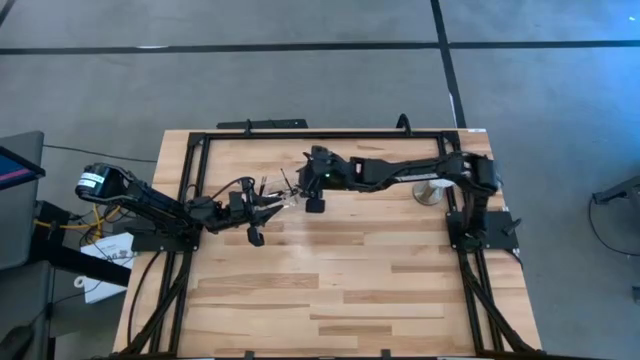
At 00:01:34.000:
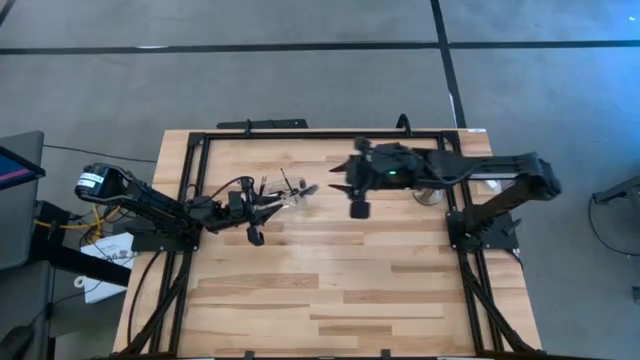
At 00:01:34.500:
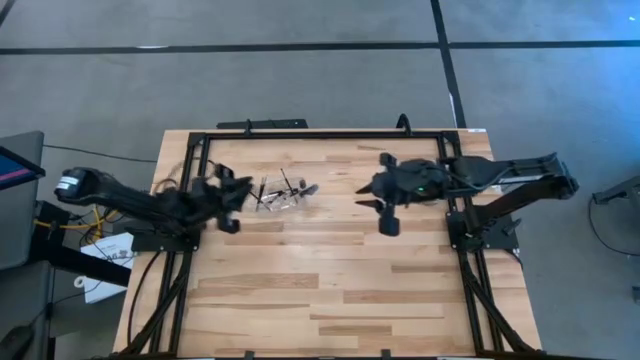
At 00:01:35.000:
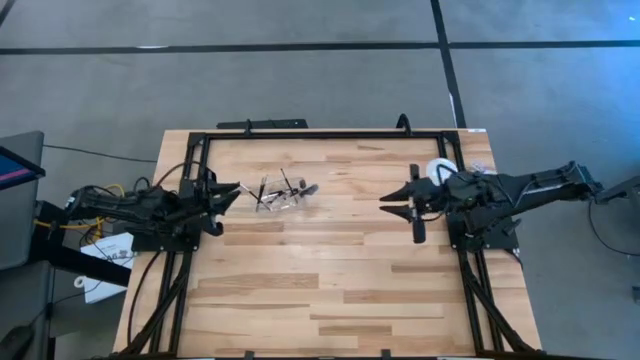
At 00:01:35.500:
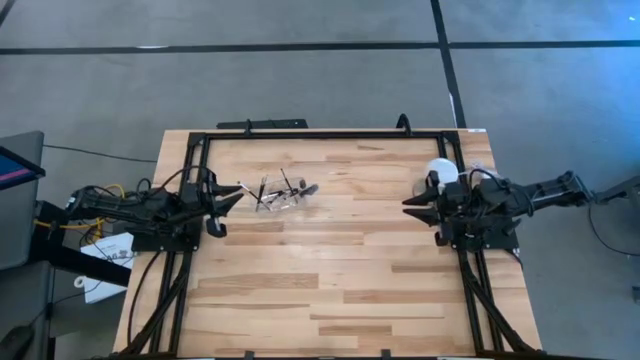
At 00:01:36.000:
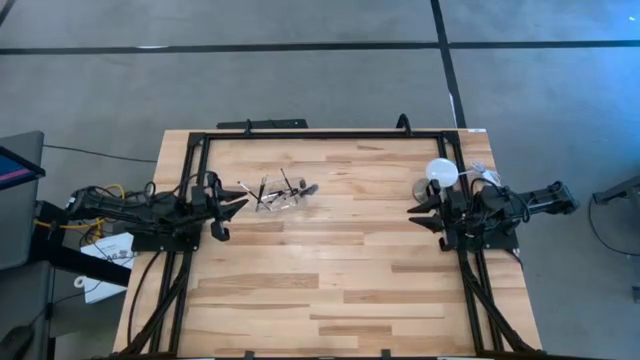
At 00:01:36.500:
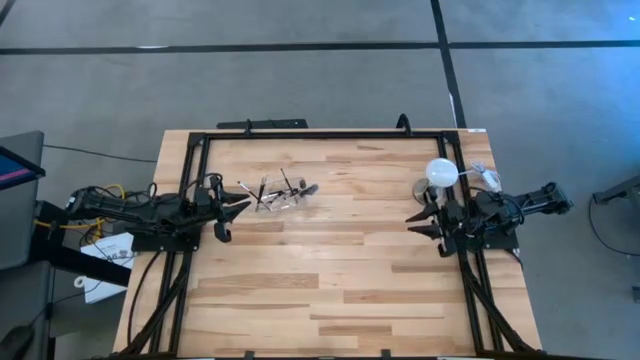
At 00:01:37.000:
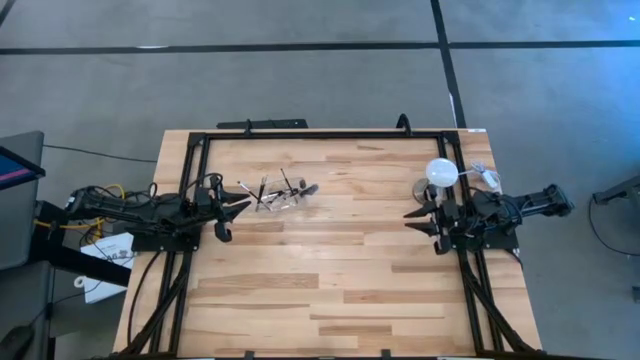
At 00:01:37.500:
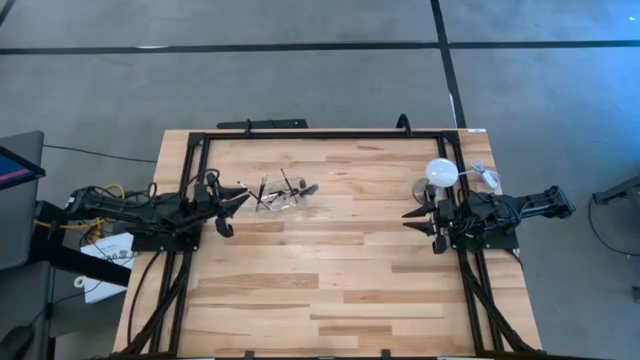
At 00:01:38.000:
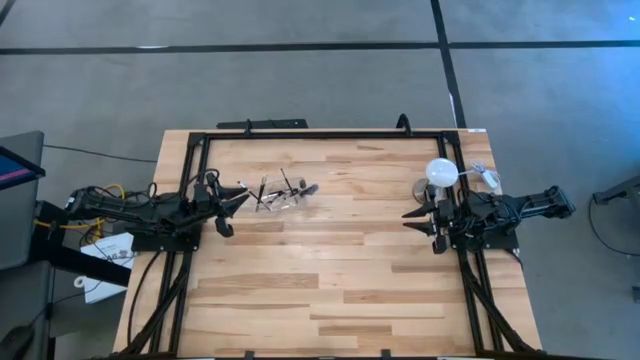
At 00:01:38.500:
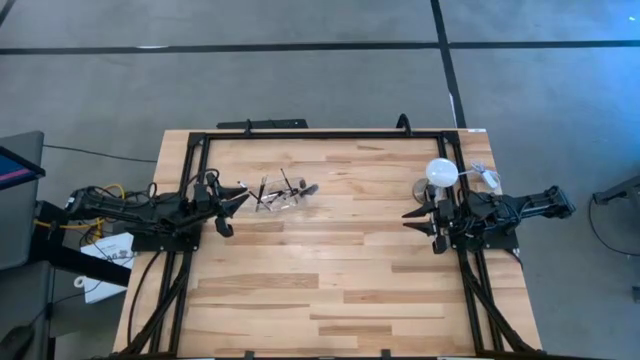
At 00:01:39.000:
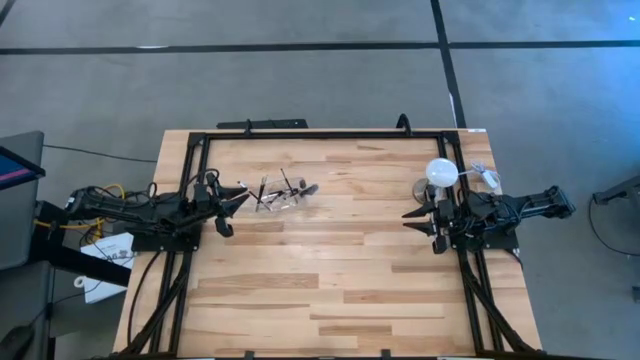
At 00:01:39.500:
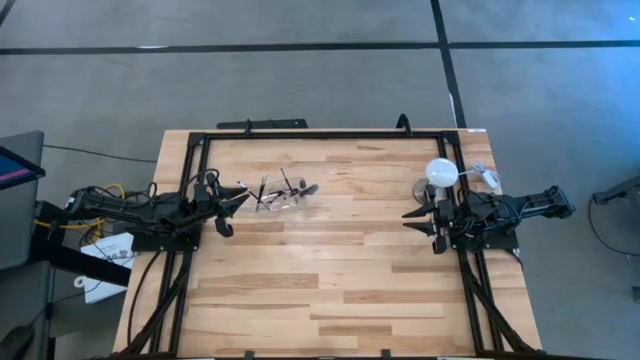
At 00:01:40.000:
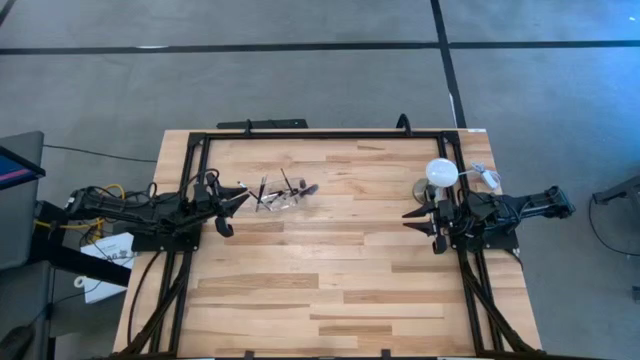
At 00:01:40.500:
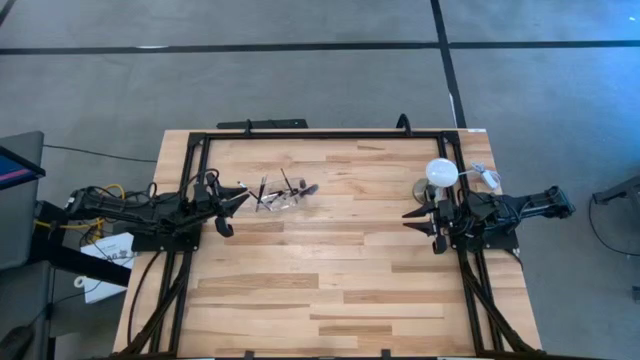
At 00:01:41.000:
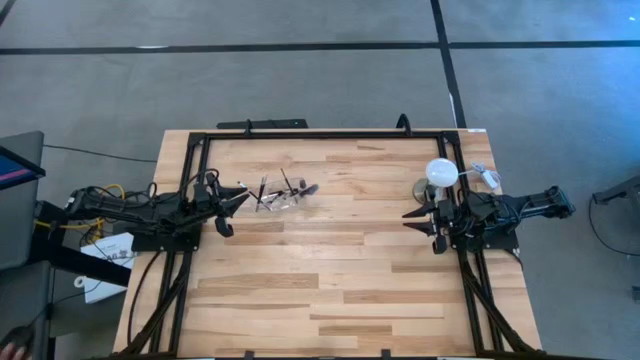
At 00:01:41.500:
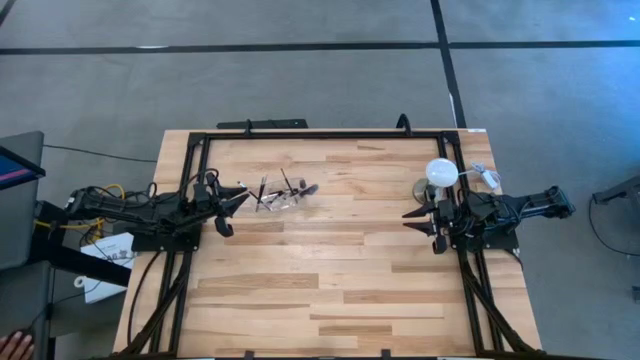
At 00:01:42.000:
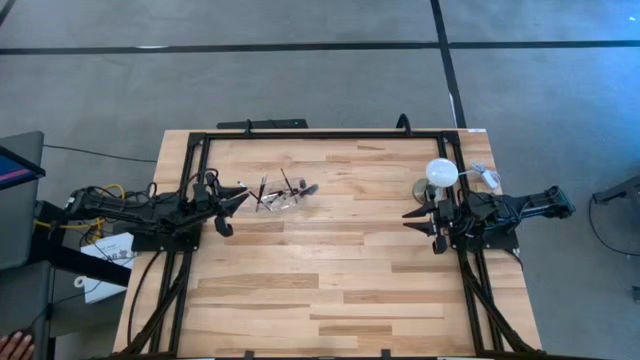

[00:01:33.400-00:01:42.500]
Task: Put items in baskets/containers
Return to Home Position

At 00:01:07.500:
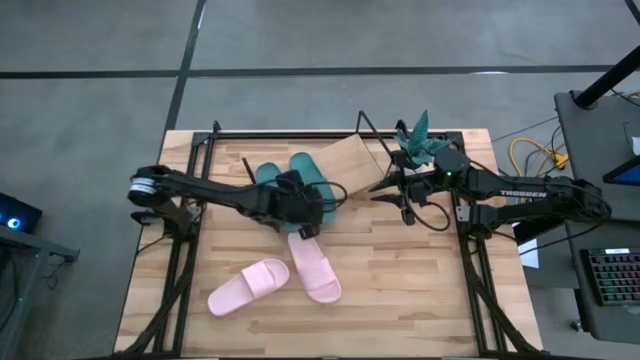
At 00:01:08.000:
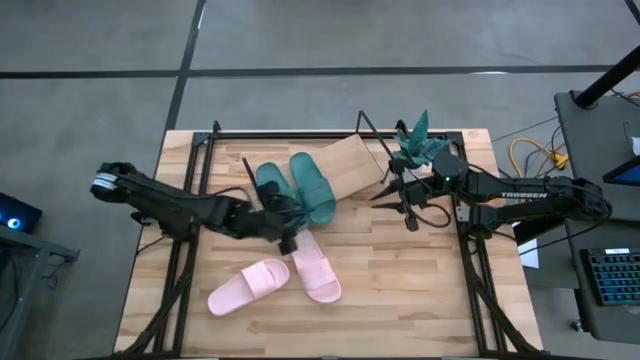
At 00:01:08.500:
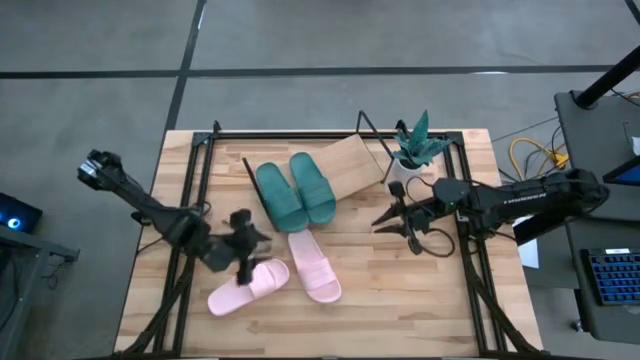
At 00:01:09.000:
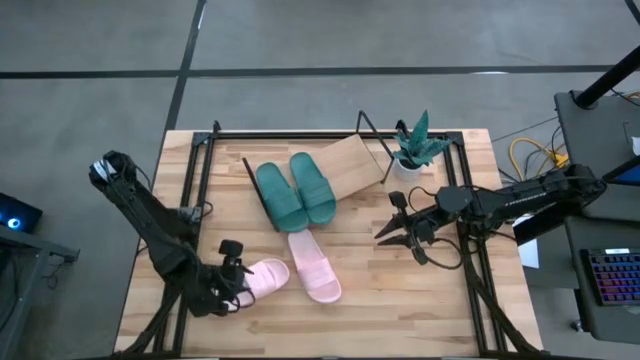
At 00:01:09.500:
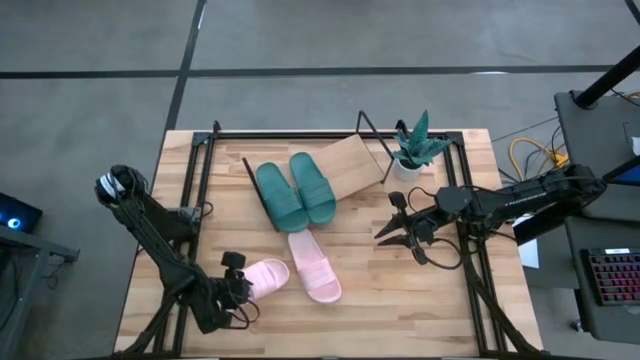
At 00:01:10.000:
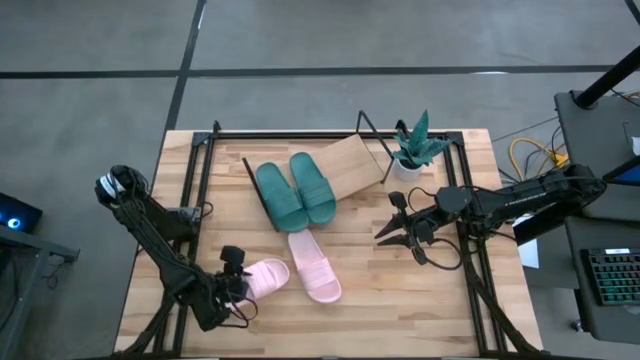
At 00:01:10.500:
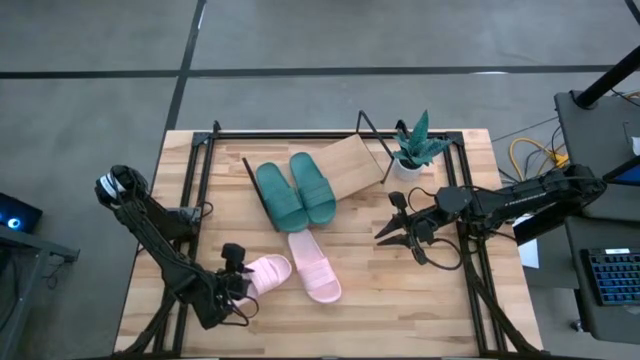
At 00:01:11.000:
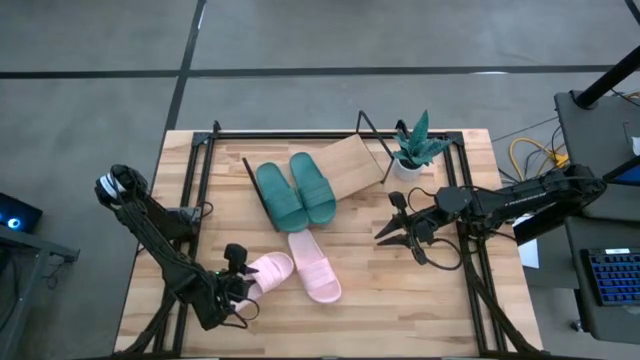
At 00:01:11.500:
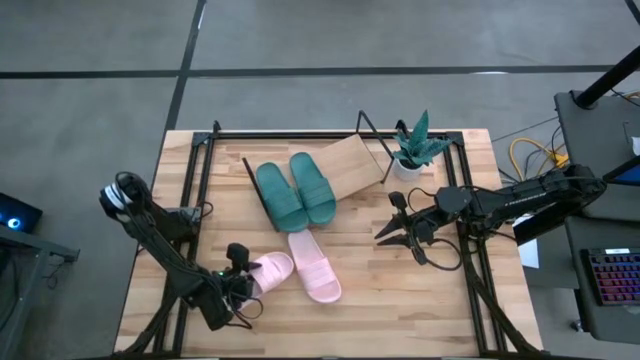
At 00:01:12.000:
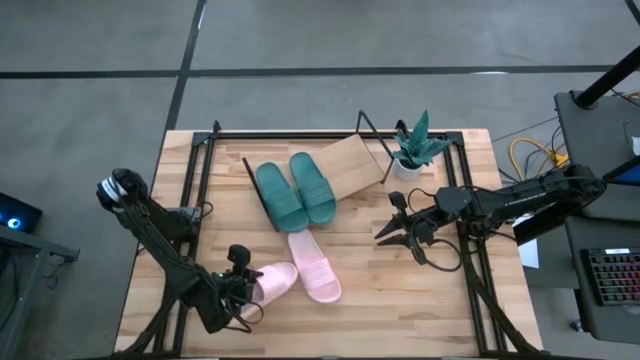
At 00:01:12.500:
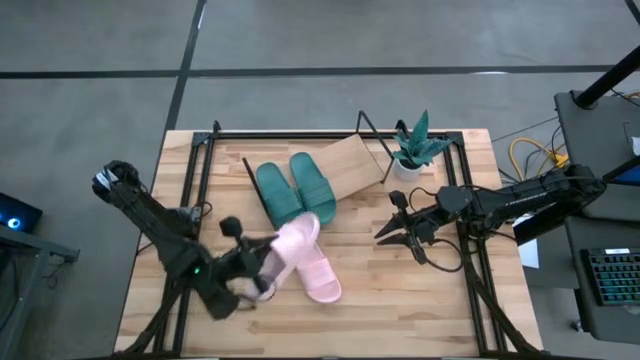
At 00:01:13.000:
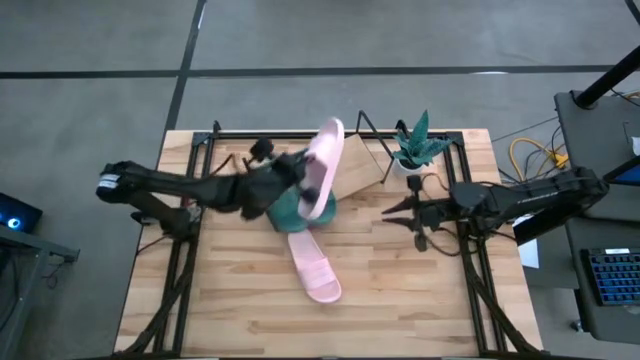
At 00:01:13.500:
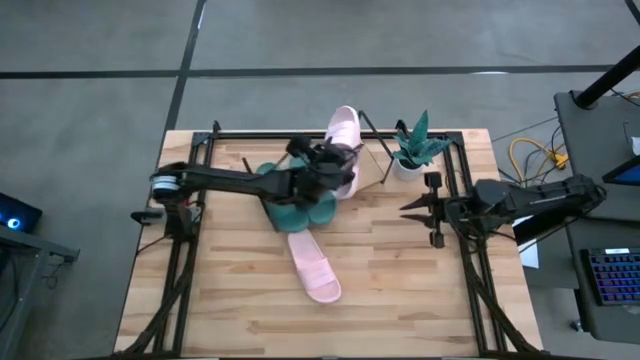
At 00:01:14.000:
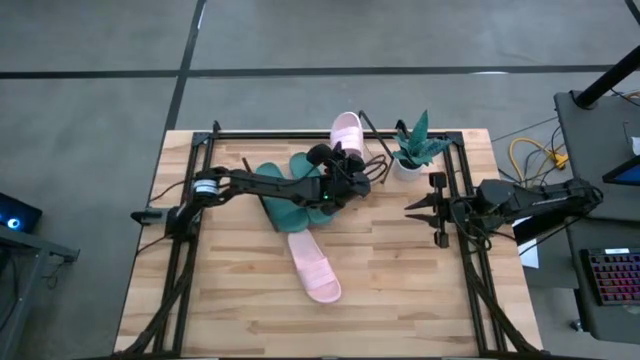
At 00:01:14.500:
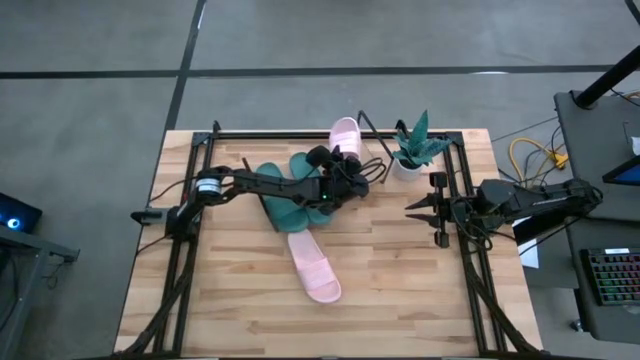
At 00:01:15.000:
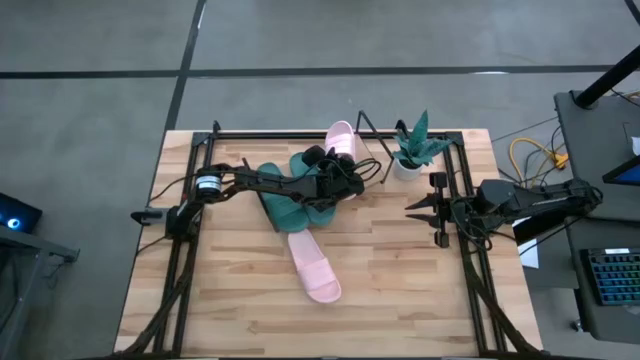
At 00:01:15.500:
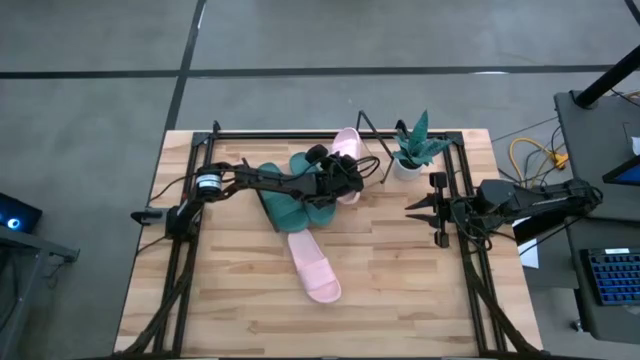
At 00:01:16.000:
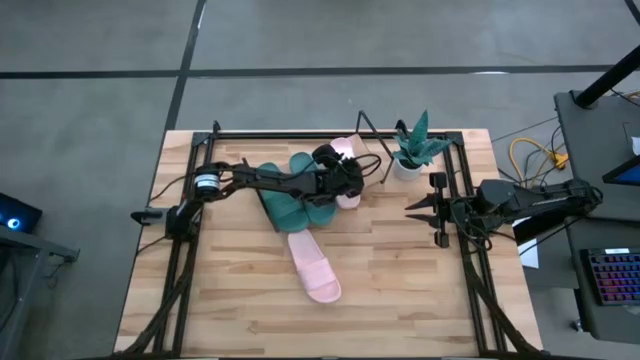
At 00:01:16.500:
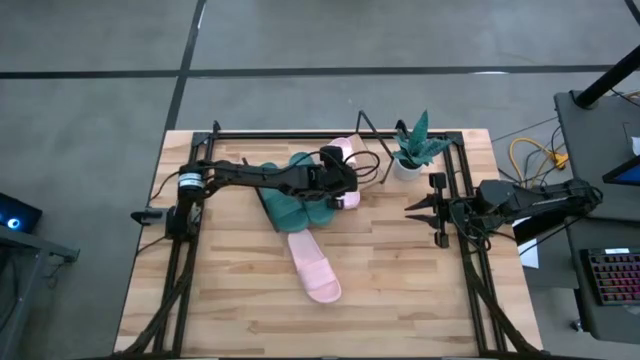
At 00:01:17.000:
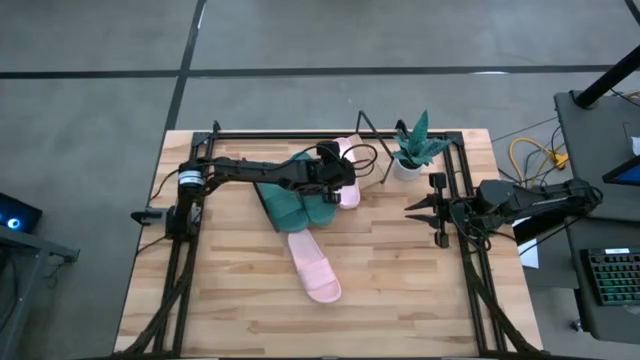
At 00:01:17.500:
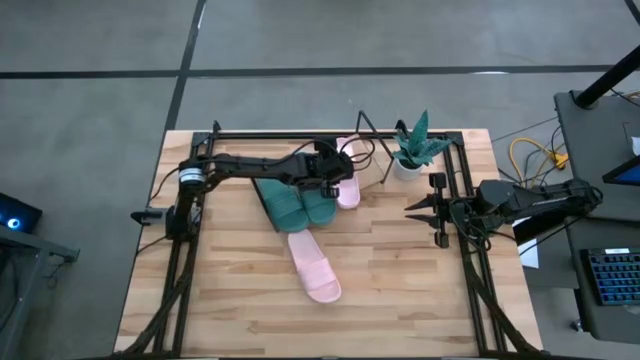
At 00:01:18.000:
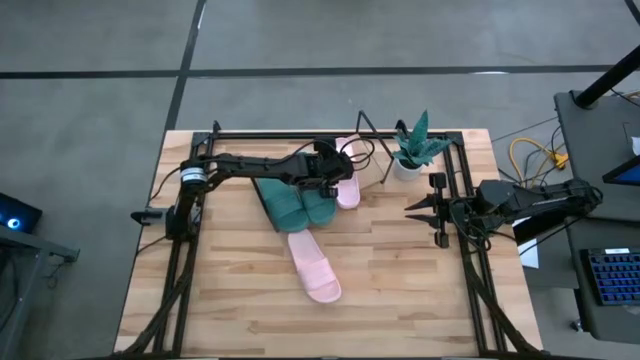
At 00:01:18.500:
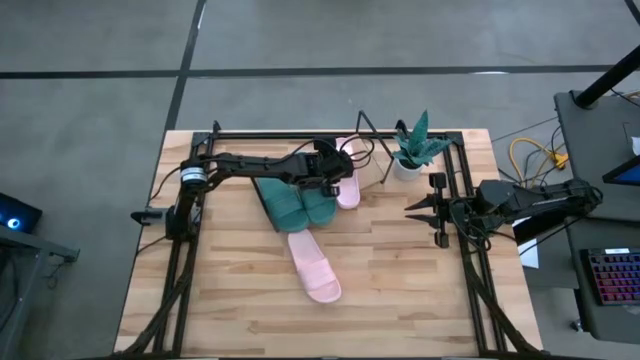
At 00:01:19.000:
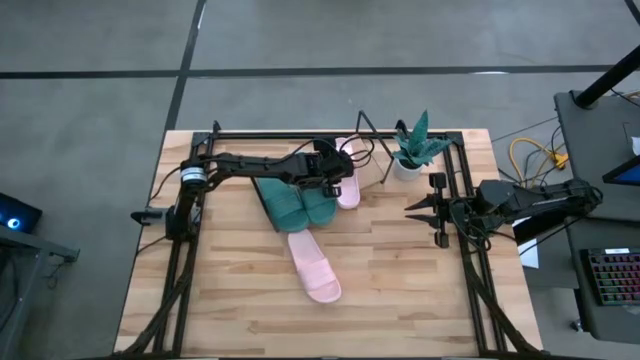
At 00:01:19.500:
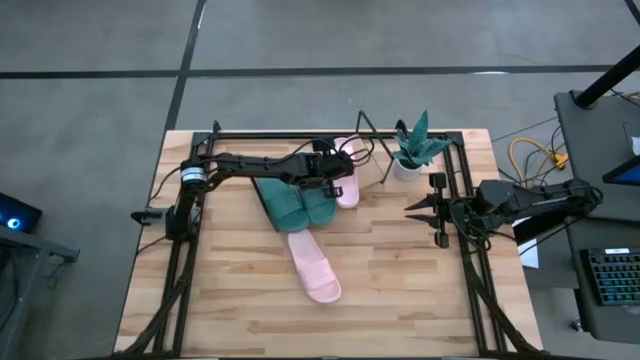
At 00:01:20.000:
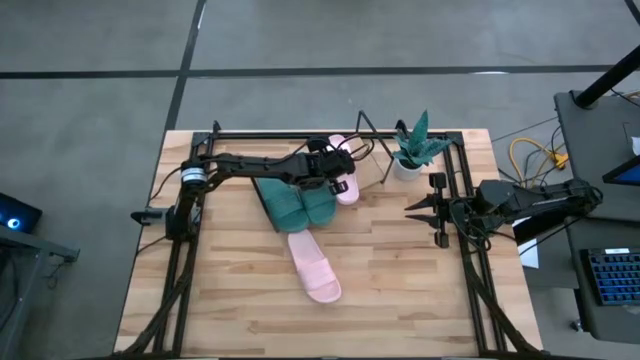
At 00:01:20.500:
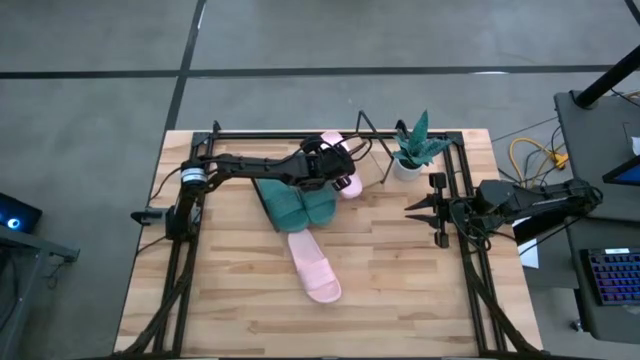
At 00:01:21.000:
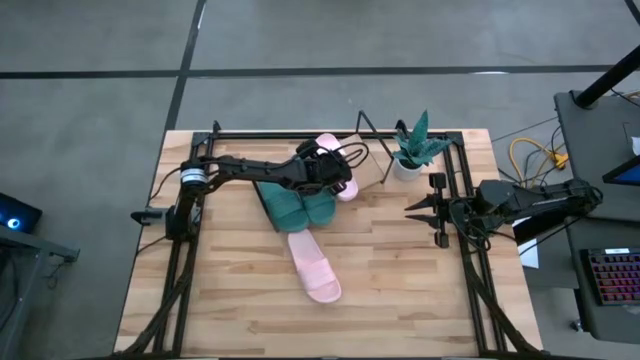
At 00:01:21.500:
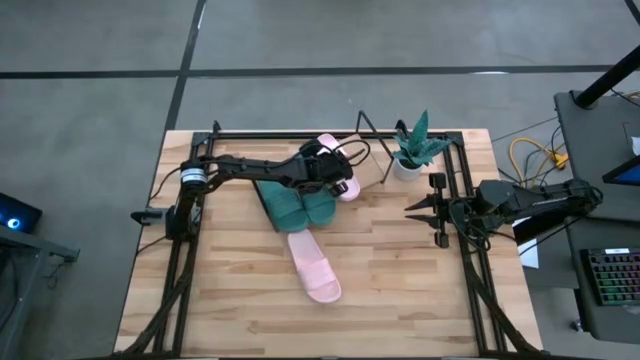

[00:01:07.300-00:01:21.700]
Task: Pick and place slides into the shelf
Put the left pink slide on the shelf
